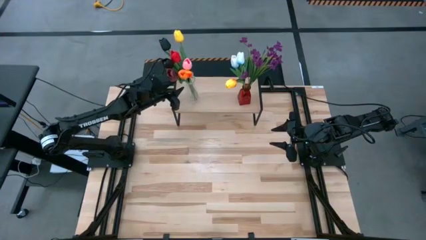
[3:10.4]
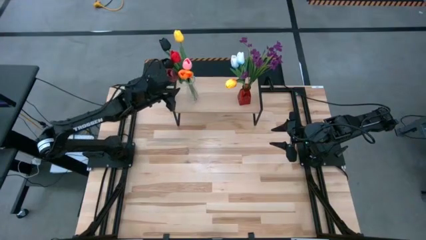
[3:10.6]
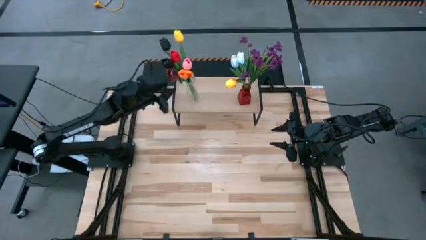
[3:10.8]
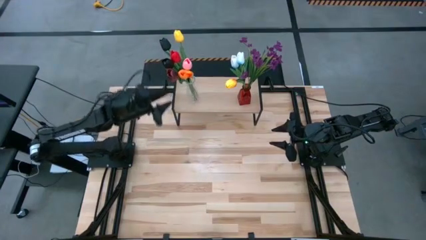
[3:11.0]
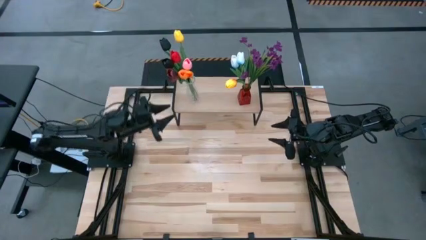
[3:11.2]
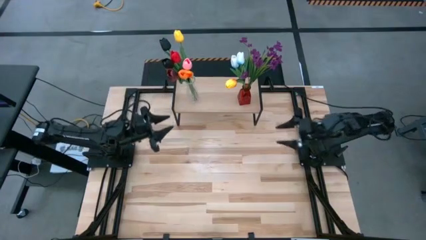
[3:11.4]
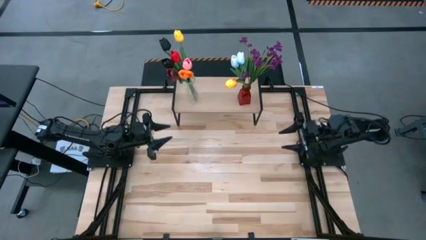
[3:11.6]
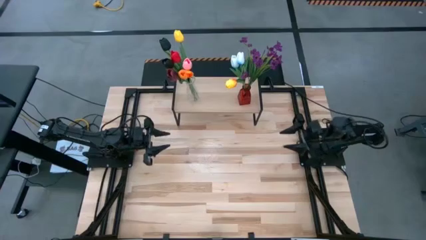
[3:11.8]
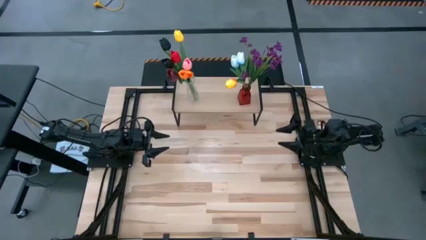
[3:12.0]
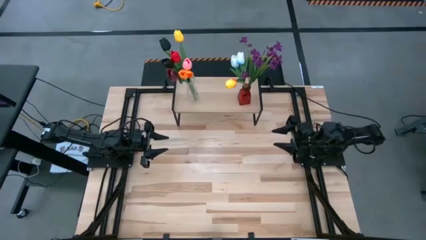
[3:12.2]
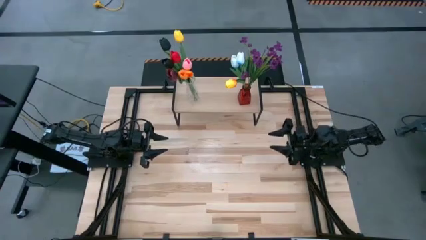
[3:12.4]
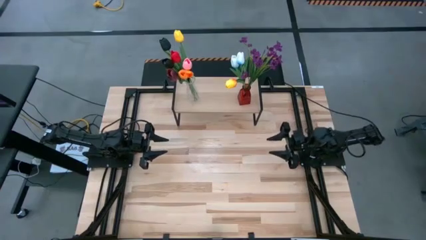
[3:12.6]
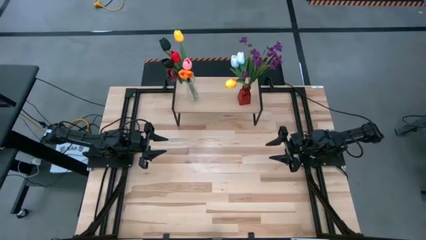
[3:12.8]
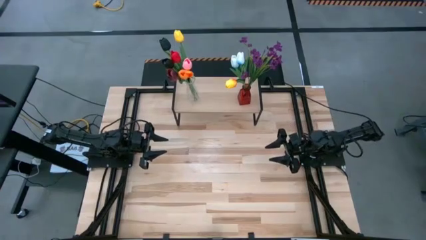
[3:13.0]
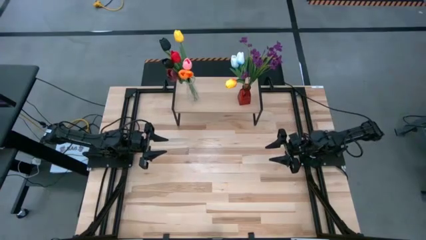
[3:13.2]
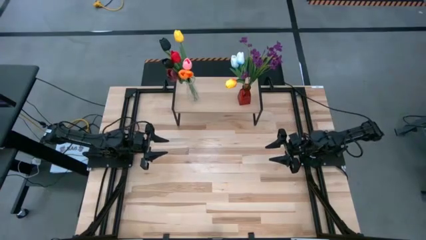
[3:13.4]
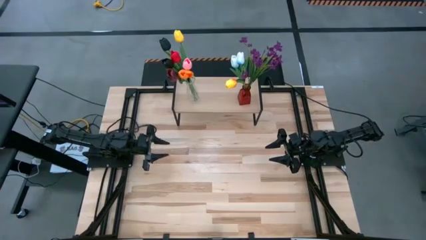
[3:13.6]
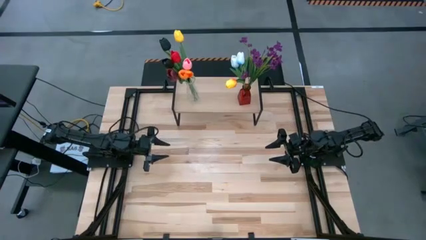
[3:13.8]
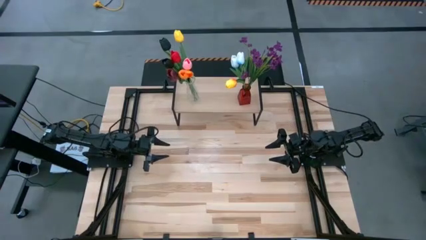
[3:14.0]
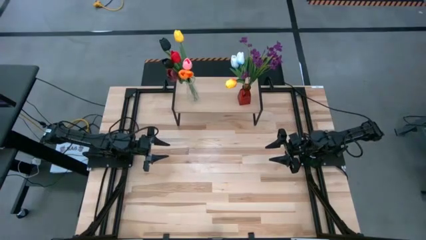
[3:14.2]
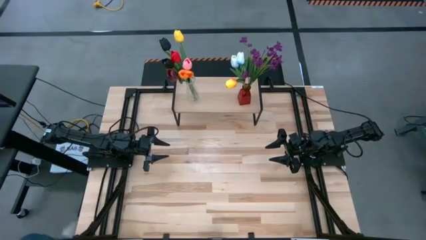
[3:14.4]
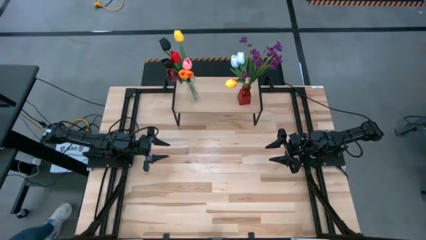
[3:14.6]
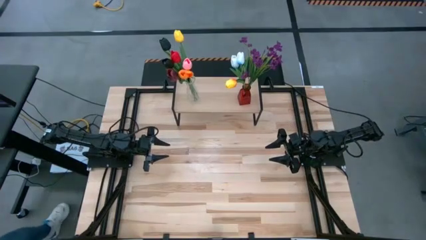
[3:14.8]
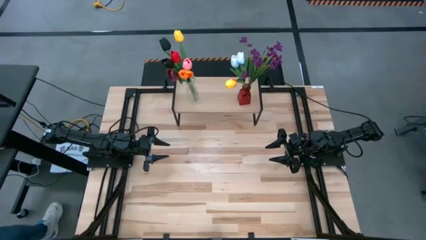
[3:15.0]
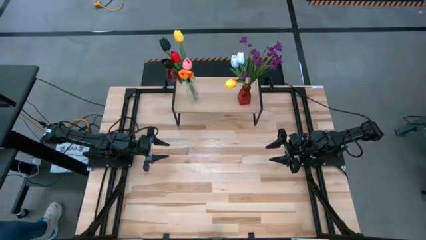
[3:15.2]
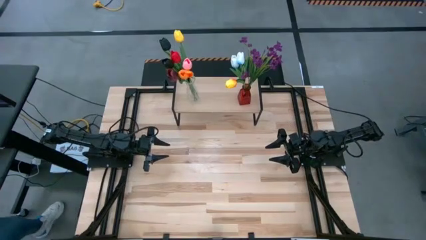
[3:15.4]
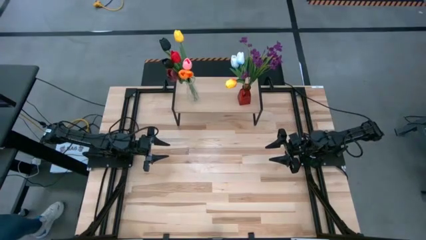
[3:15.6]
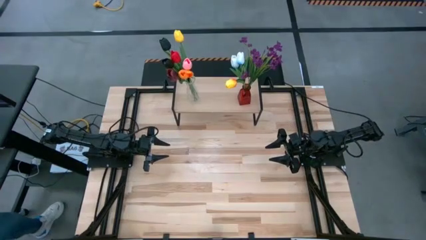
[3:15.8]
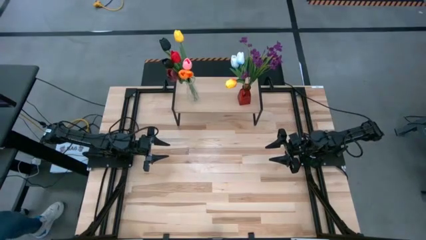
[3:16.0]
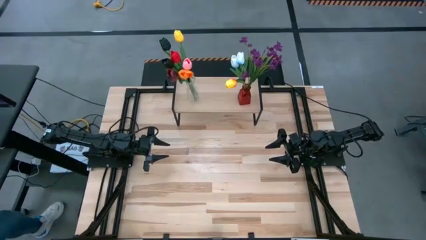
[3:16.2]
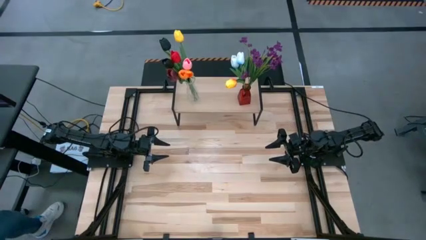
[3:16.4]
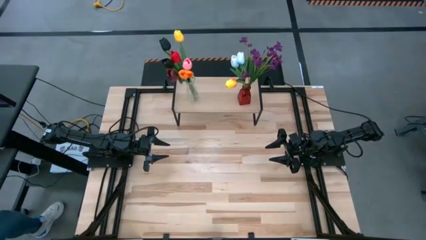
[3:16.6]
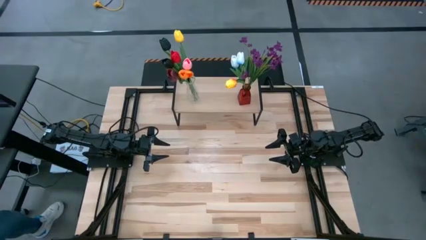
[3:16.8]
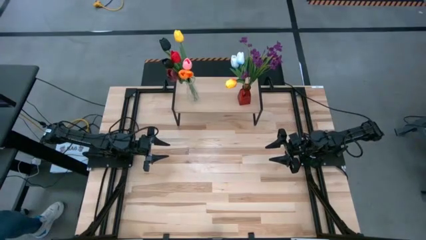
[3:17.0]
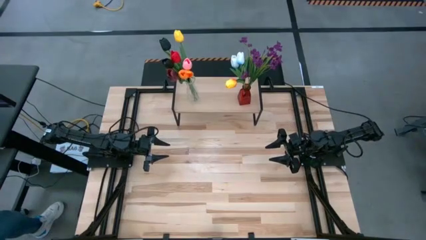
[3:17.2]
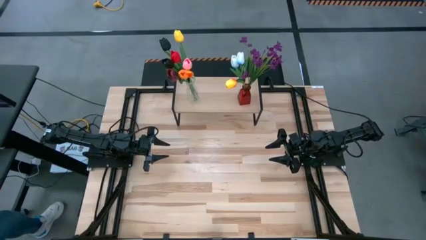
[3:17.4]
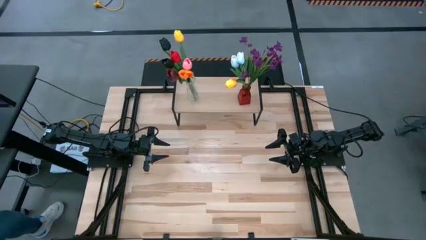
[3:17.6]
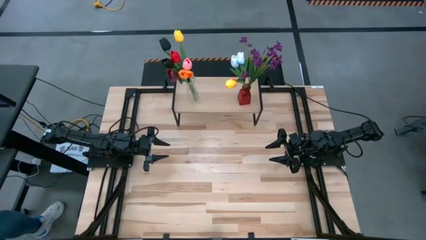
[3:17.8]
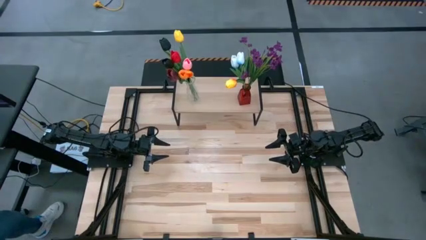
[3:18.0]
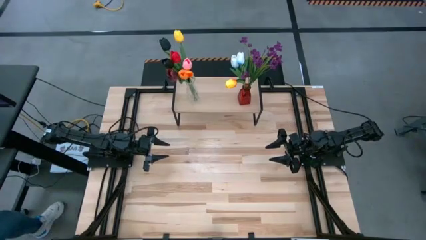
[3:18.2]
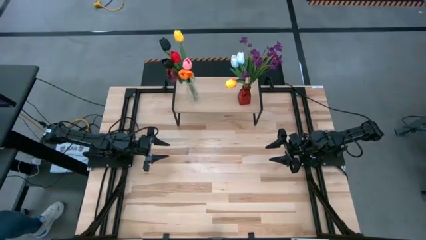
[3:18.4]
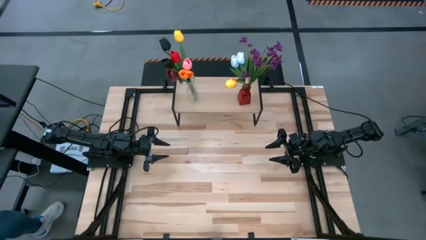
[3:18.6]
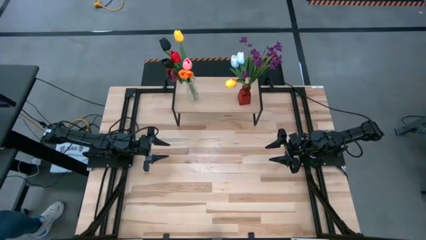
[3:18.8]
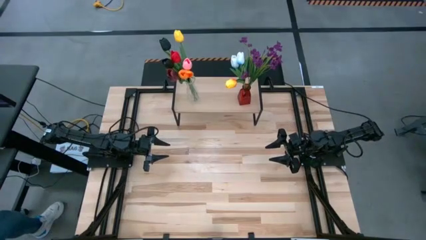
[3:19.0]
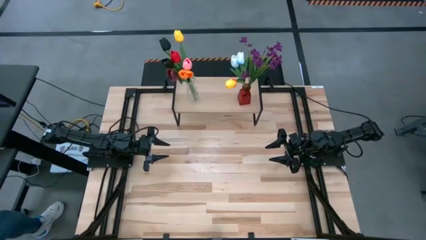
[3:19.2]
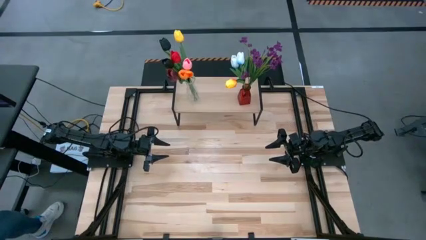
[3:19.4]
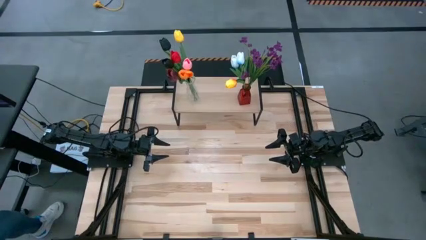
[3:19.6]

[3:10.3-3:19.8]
Task: Pick and place flowers into a vace then onto a shelf
Return to Home Position

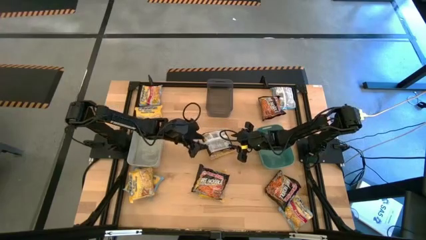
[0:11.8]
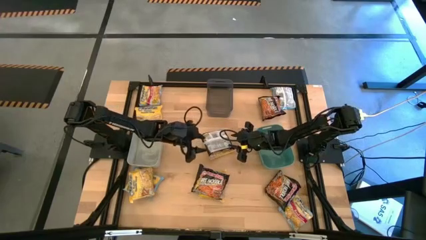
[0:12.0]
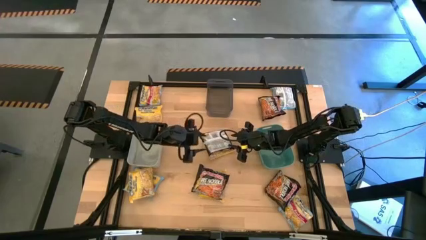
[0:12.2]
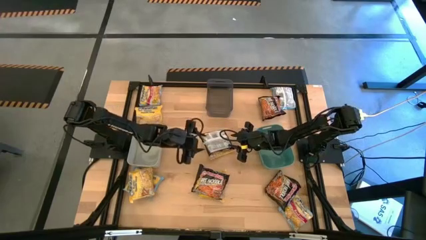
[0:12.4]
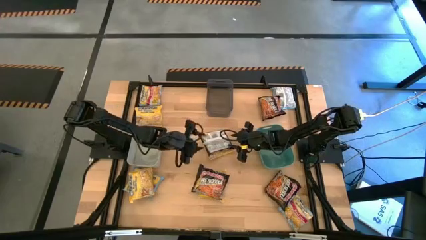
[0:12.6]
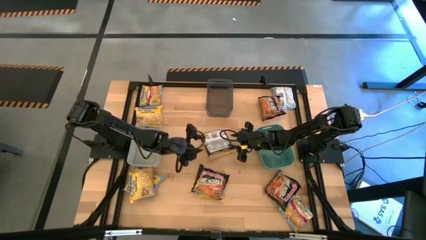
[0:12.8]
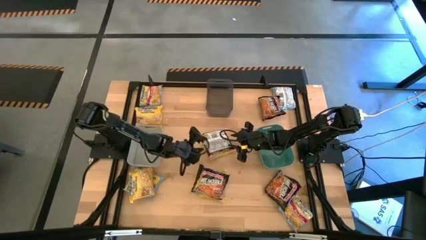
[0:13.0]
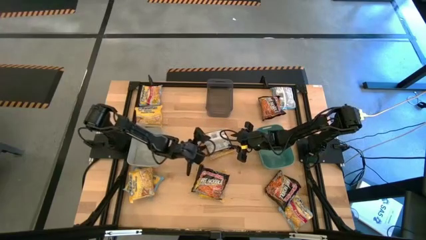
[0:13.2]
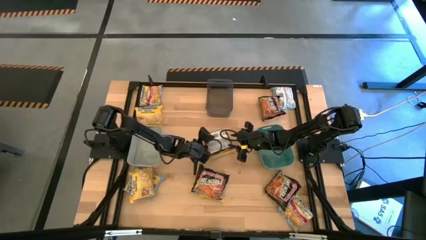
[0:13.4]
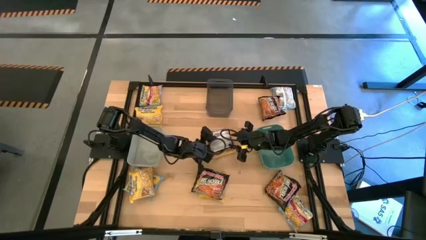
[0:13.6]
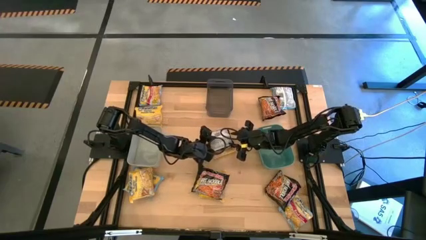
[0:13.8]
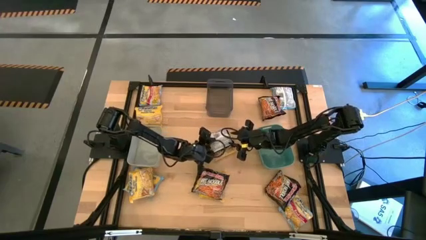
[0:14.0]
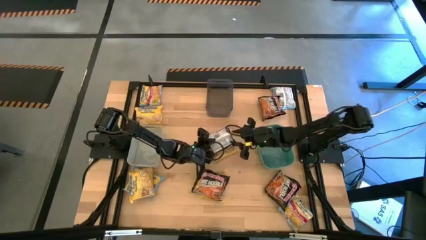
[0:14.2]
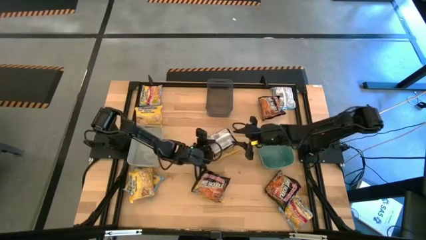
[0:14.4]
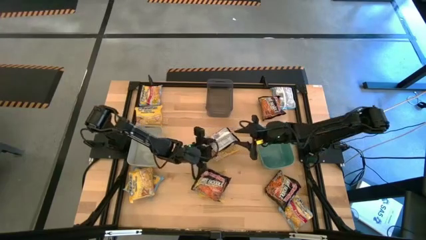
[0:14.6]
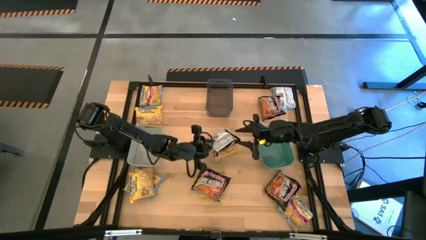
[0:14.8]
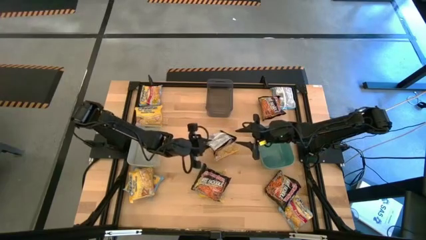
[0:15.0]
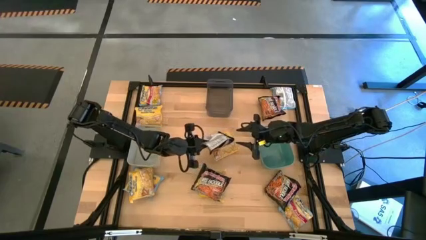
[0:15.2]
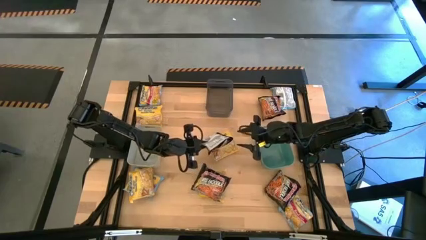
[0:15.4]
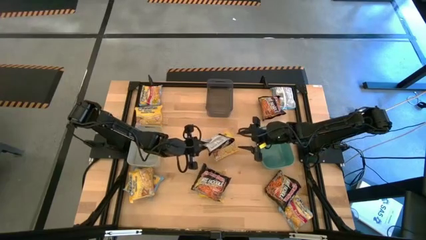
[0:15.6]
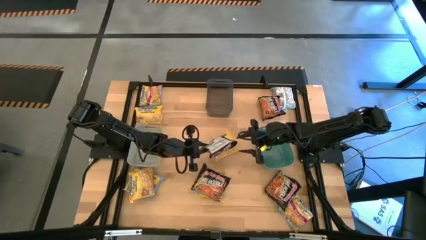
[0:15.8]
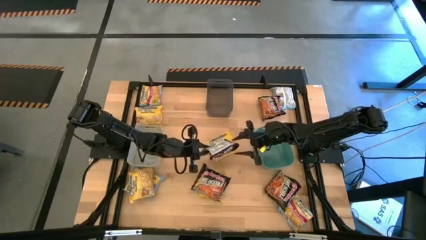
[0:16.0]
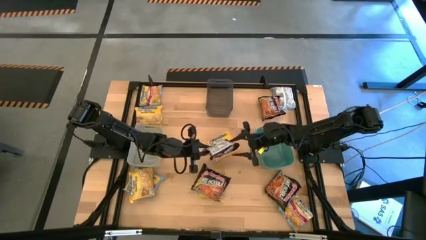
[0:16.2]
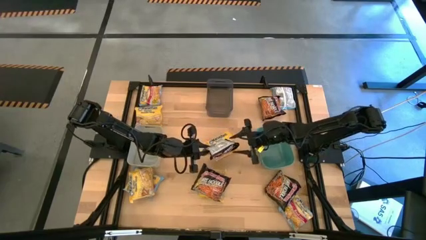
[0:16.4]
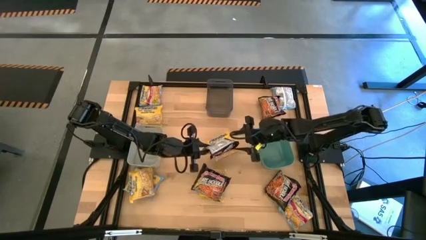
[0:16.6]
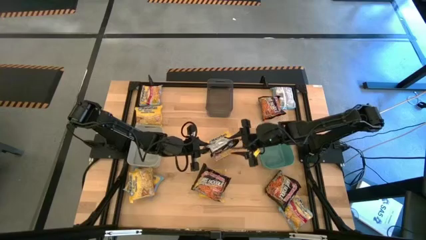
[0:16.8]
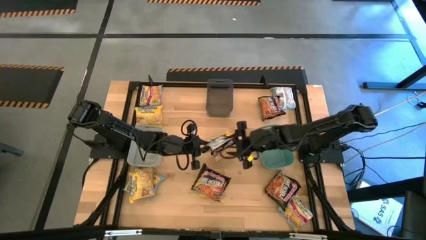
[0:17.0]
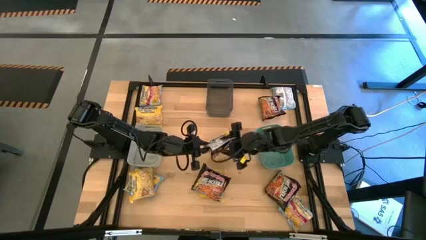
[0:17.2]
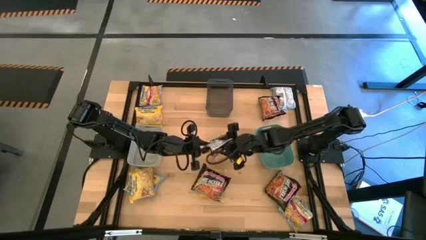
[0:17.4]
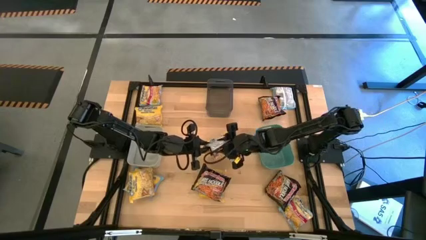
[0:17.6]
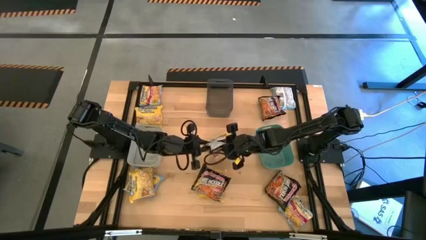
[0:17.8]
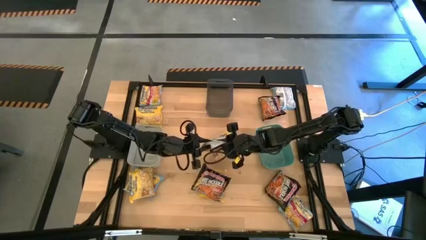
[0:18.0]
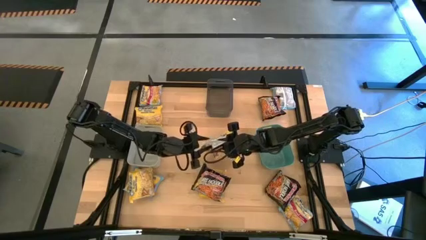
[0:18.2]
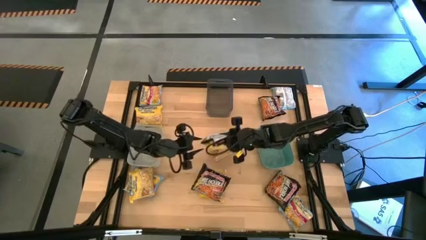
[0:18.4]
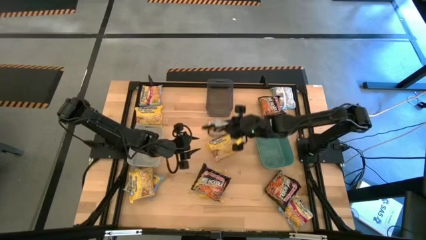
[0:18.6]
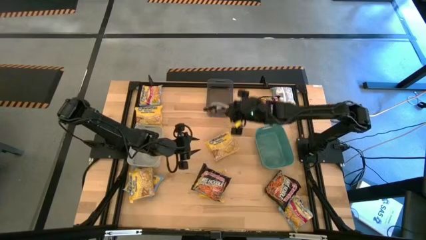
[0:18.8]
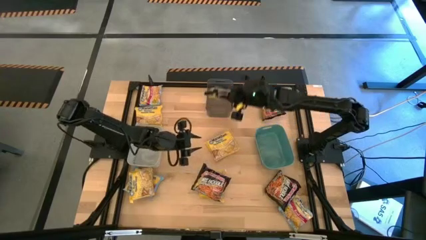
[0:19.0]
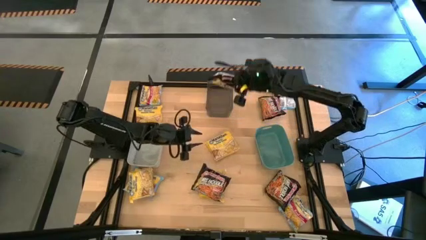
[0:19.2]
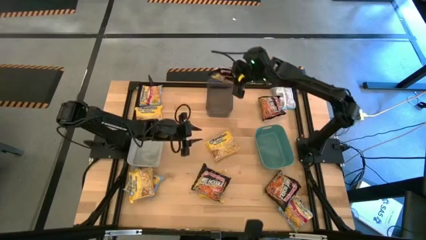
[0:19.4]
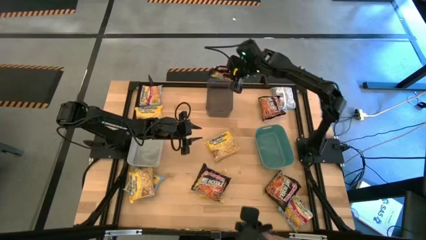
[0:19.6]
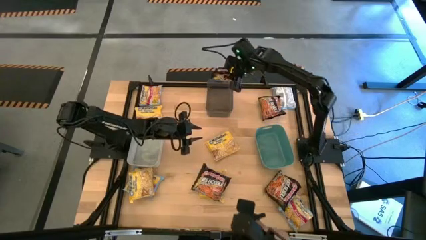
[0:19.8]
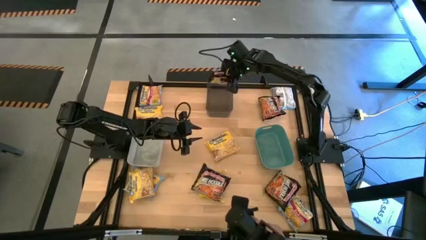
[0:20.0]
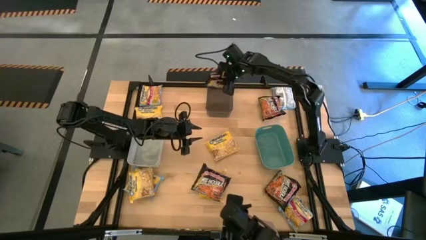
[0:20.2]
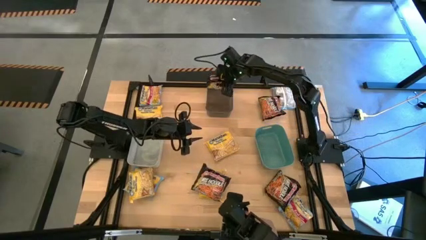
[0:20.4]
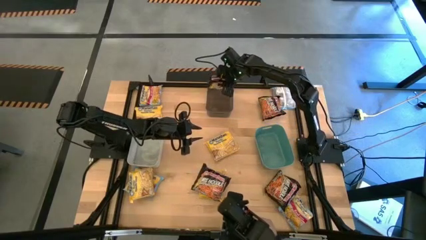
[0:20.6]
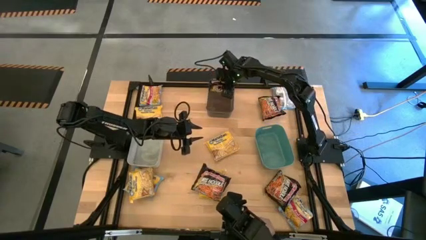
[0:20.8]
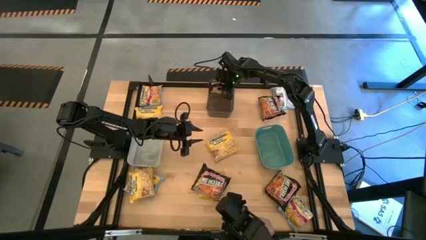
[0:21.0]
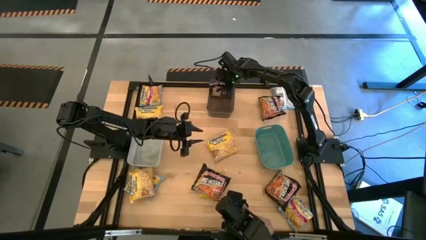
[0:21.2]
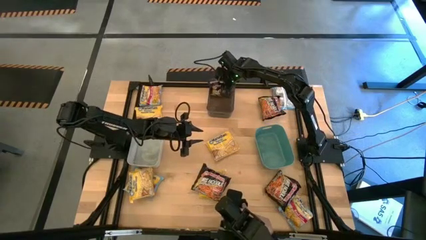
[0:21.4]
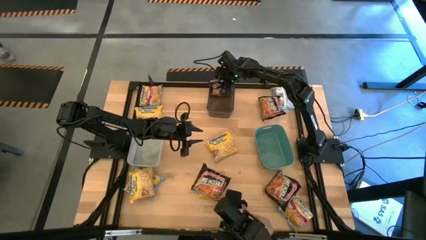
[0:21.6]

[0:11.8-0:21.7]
Task: Sort Maruchan noodles
Put the black noodle pack into the black bin
